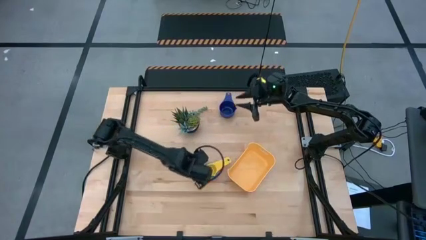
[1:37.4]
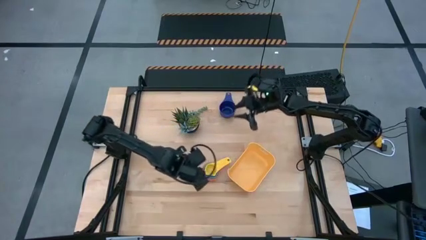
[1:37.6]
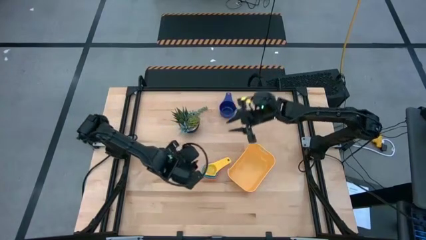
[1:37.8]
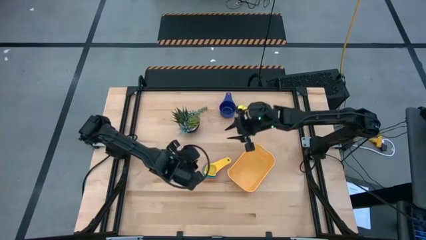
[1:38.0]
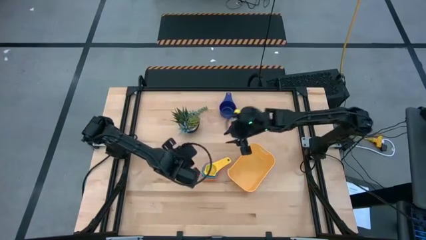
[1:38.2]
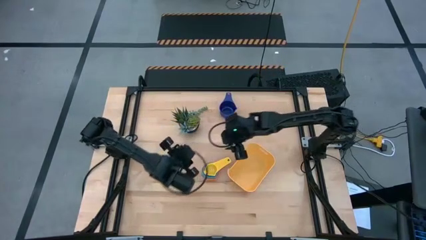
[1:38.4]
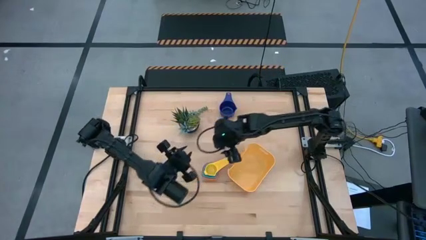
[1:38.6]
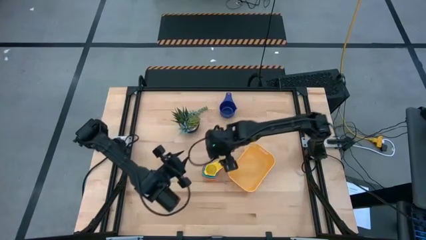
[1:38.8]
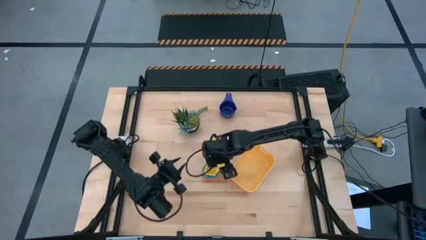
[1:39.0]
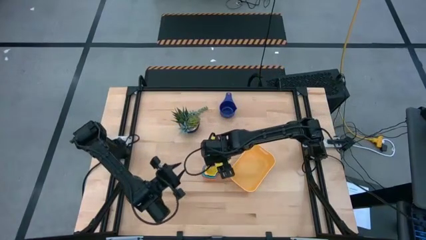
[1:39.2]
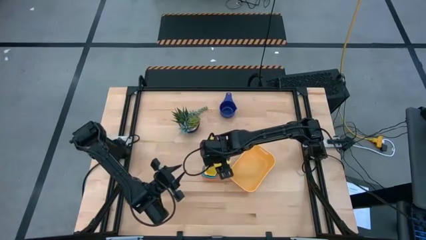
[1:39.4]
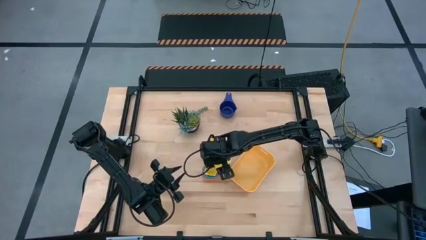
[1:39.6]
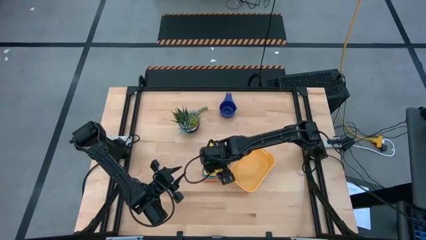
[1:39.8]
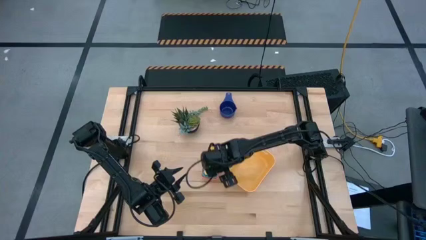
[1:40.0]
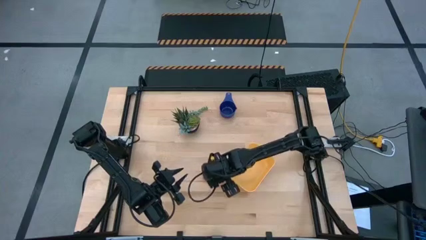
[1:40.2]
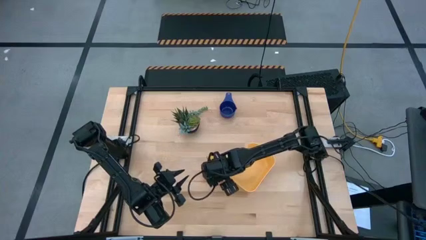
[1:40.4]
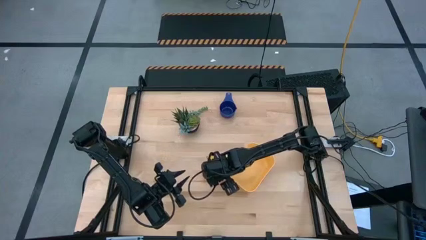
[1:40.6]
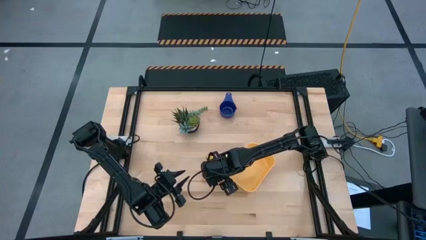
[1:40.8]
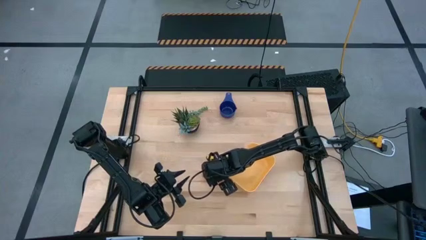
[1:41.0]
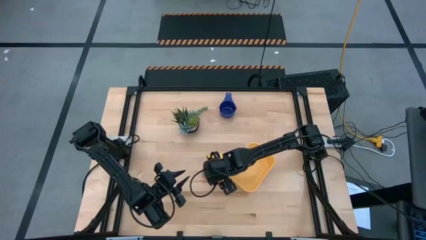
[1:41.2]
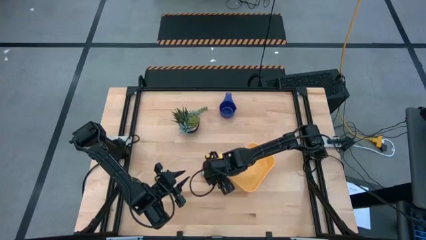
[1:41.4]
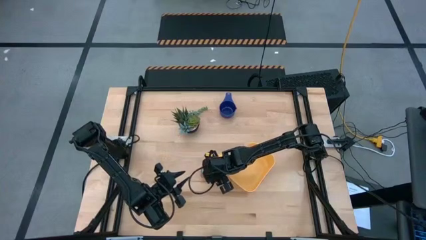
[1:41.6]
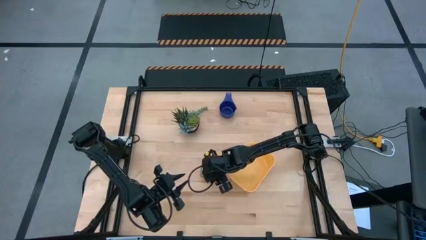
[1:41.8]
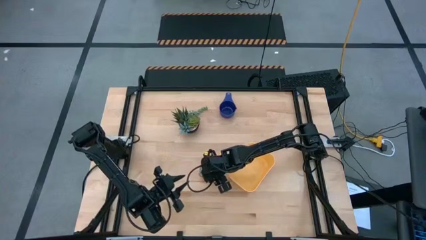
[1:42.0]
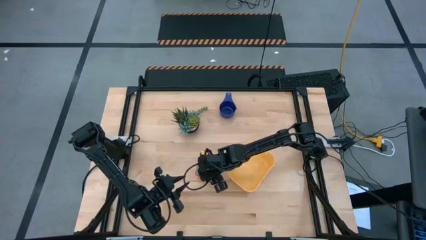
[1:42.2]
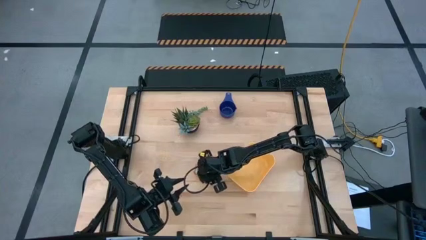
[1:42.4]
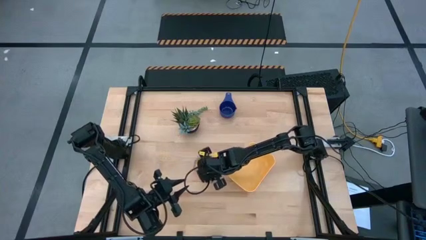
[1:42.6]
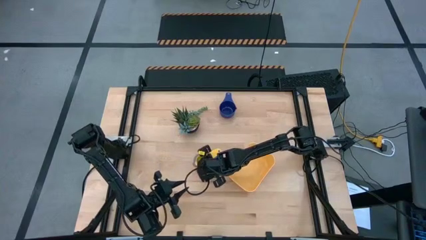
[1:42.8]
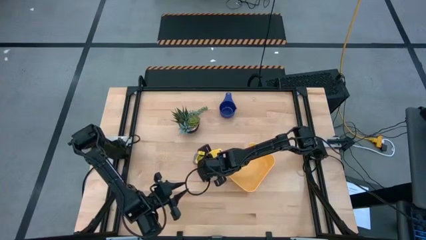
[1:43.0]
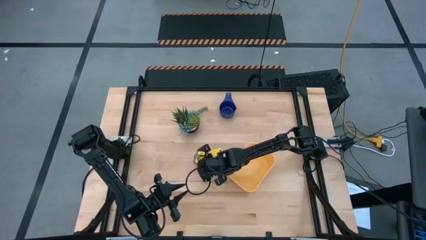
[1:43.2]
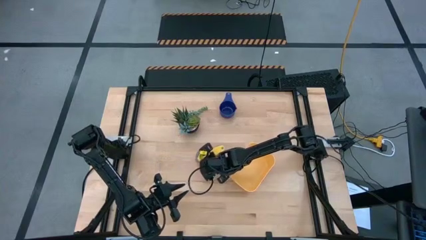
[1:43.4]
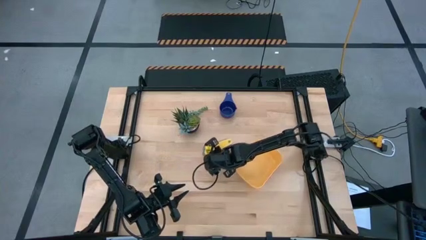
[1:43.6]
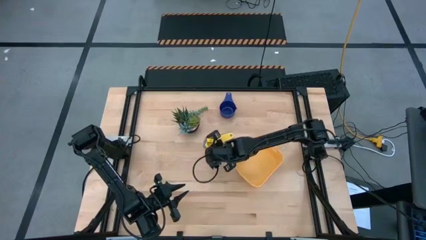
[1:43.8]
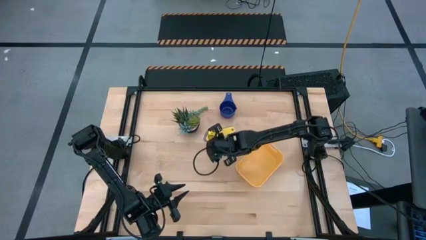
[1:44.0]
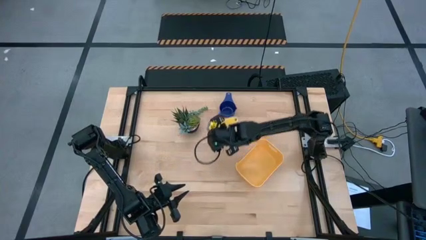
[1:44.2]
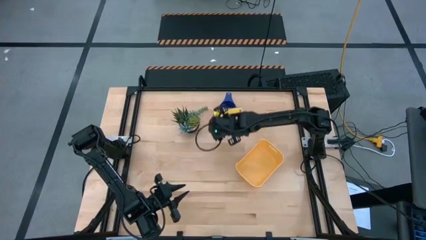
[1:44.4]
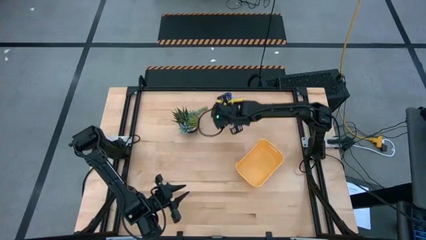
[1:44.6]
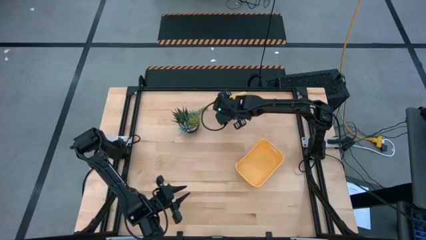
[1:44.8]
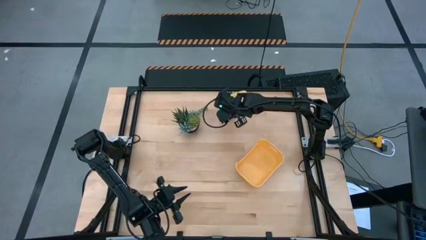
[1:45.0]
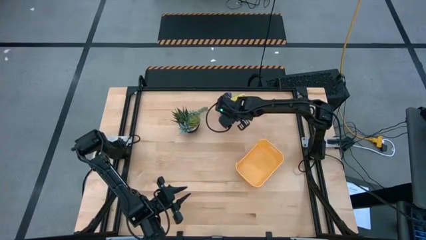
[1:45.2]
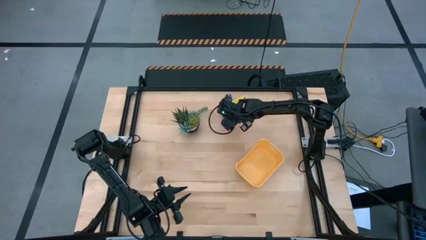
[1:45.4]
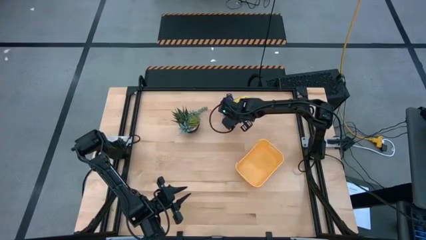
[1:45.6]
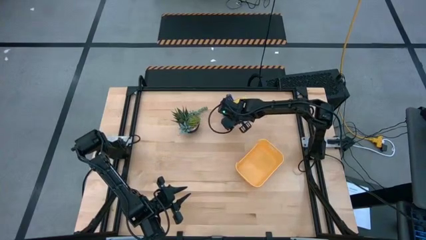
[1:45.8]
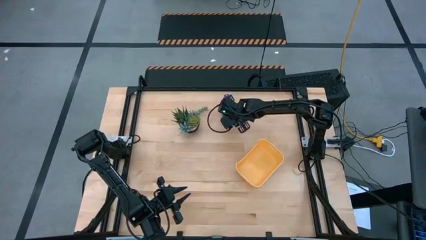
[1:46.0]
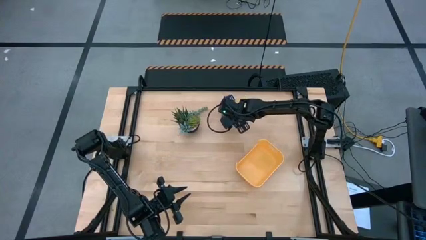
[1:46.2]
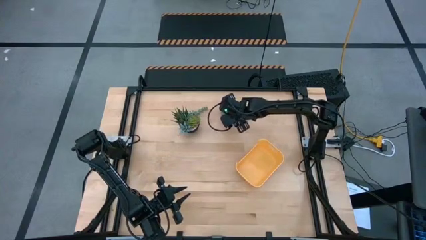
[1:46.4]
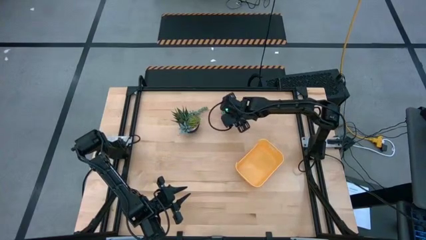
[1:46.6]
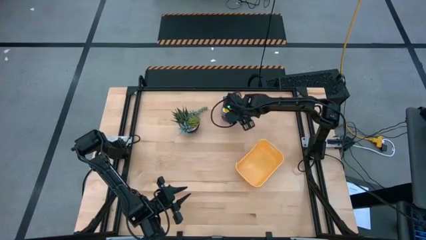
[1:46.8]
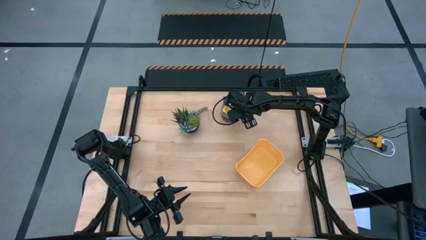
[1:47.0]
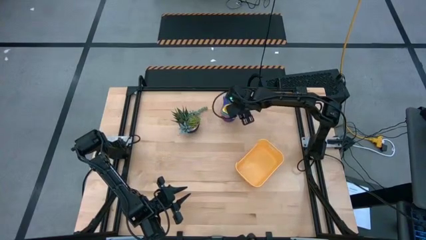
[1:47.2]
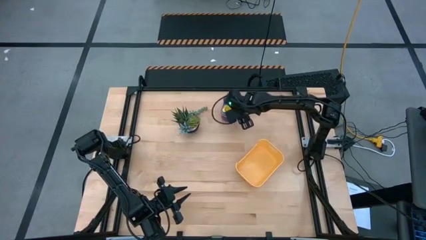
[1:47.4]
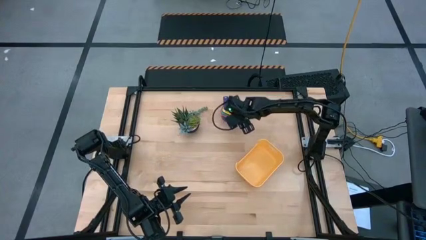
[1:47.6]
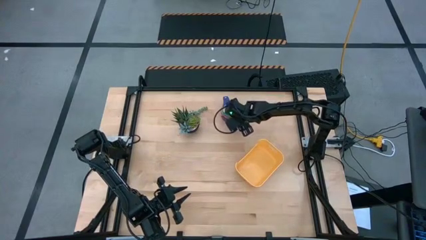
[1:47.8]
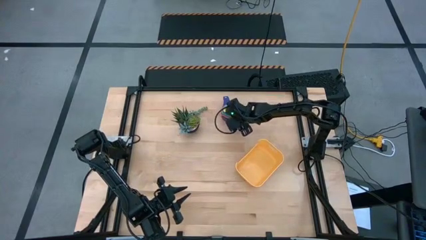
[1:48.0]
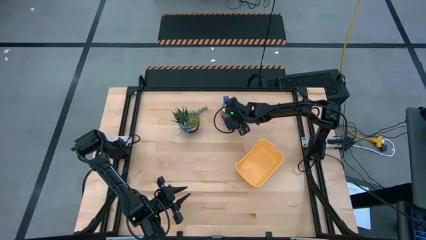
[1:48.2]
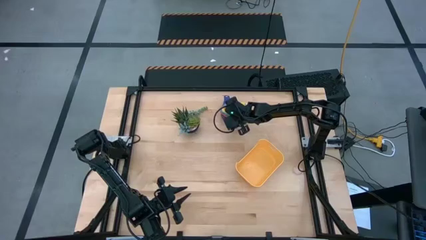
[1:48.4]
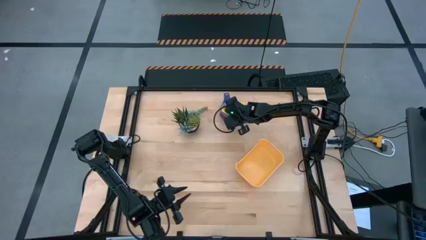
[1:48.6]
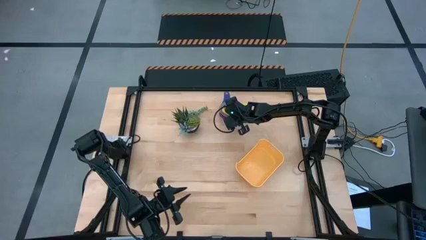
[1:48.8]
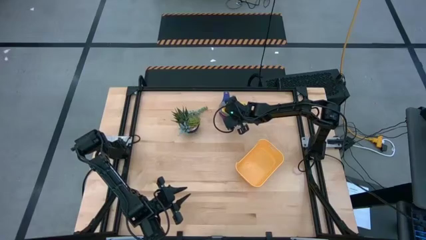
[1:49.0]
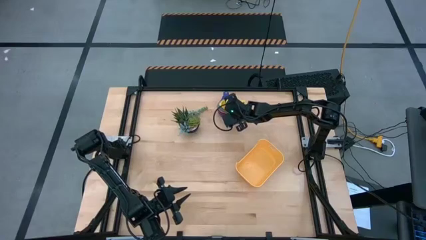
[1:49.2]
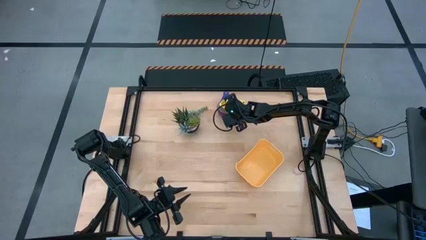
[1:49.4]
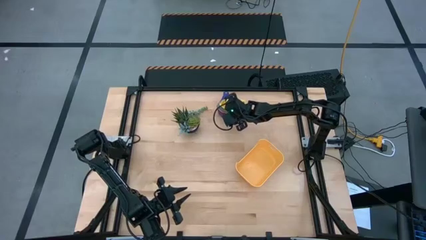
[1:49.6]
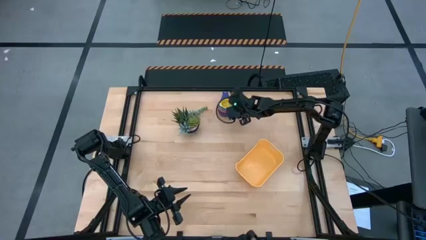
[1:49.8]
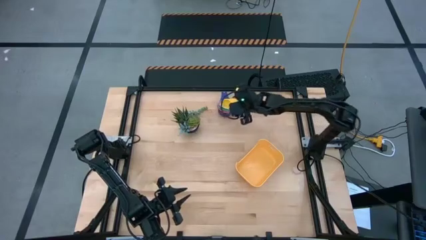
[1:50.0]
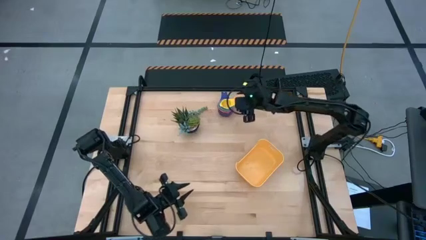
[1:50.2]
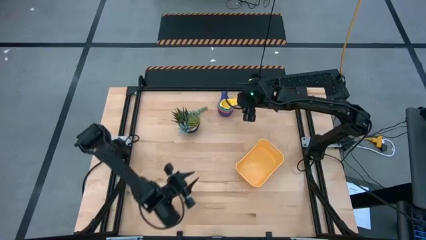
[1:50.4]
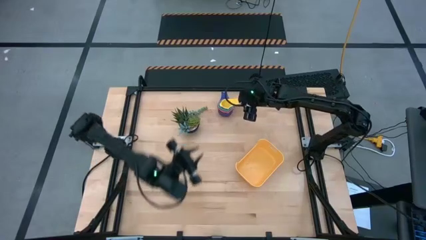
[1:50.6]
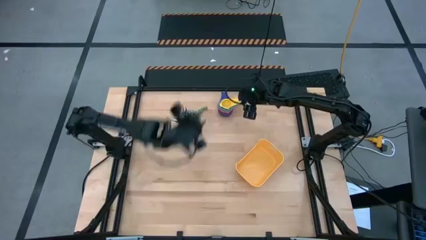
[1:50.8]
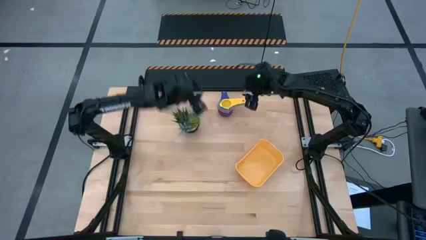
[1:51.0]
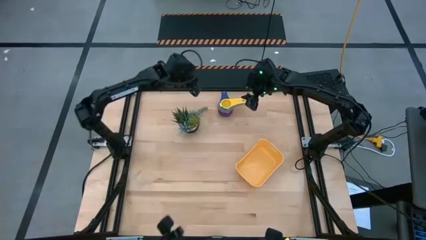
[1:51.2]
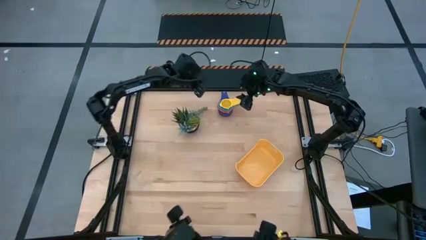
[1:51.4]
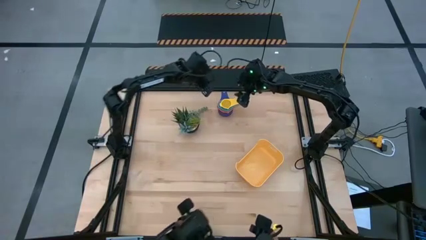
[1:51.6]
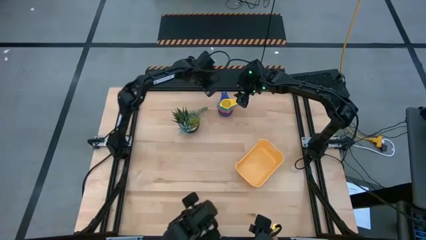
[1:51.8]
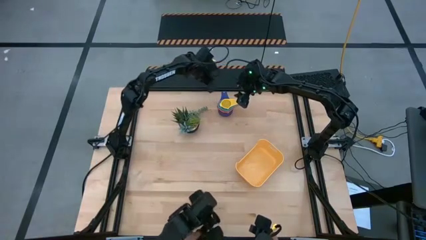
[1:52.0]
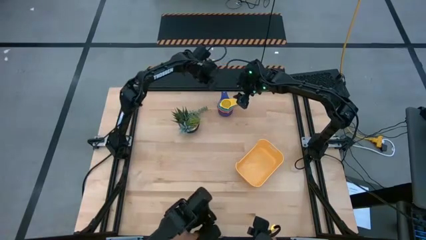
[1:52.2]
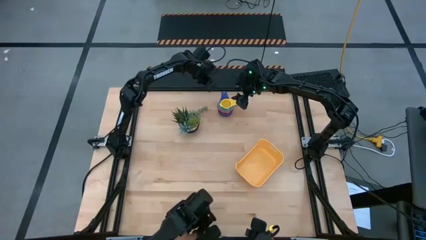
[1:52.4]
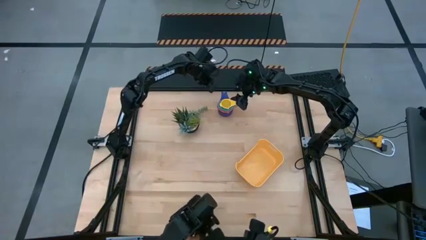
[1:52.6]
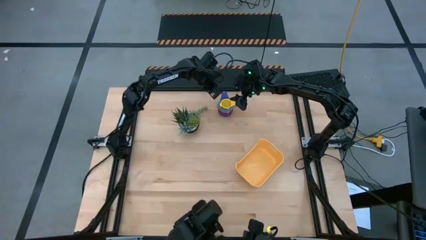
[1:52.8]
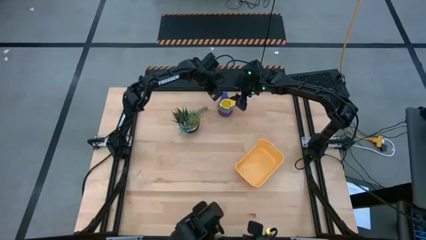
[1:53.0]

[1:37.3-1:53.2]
Task: Nest measuring cups in basket
Stack the measuring cups on the purple measuring cup

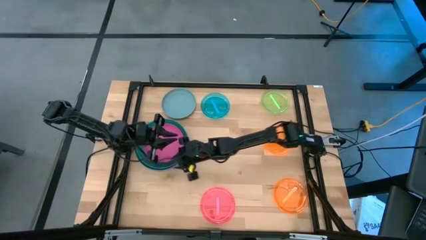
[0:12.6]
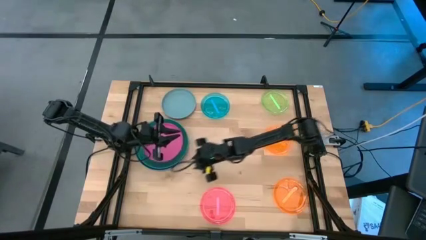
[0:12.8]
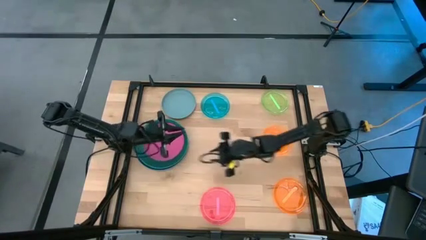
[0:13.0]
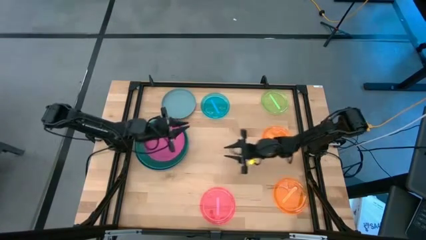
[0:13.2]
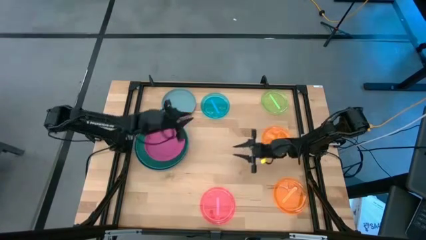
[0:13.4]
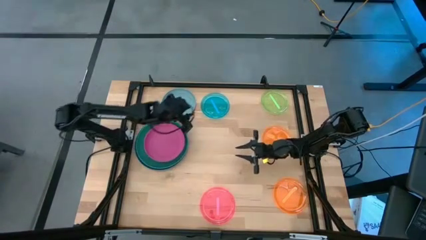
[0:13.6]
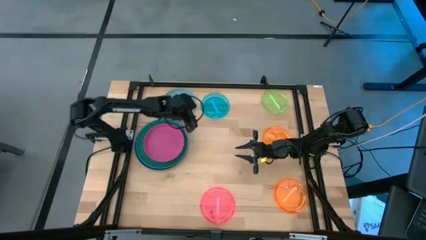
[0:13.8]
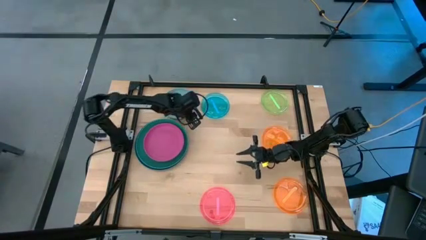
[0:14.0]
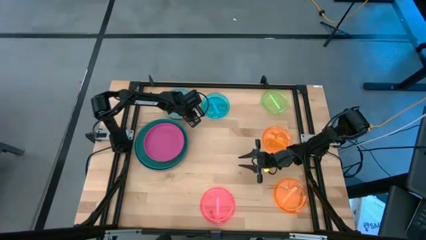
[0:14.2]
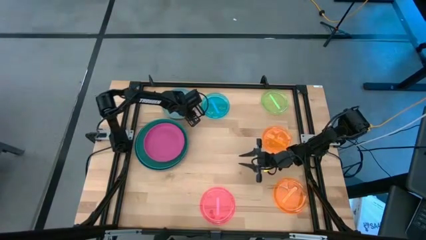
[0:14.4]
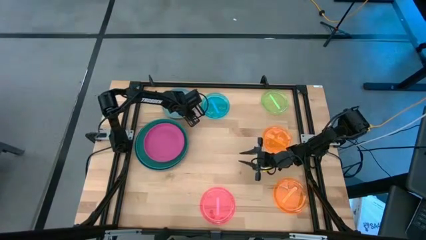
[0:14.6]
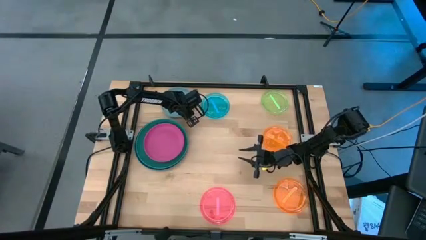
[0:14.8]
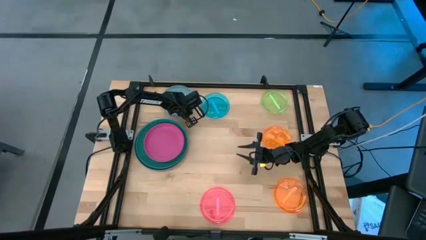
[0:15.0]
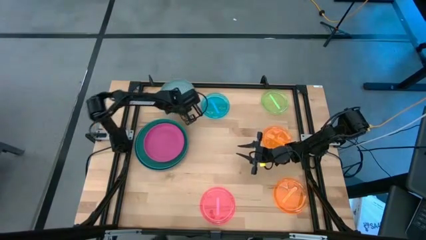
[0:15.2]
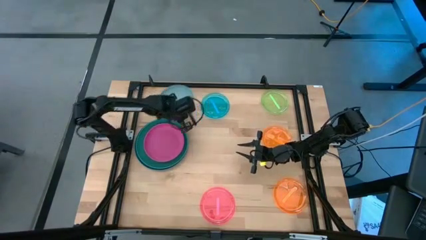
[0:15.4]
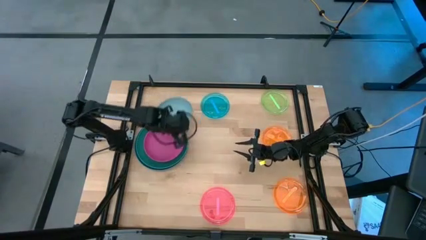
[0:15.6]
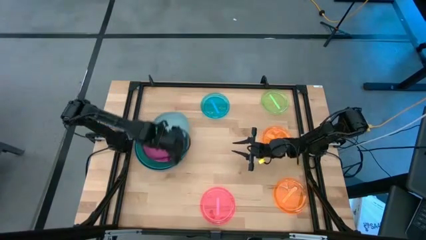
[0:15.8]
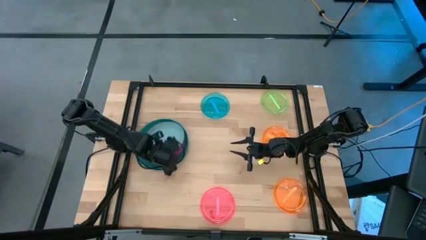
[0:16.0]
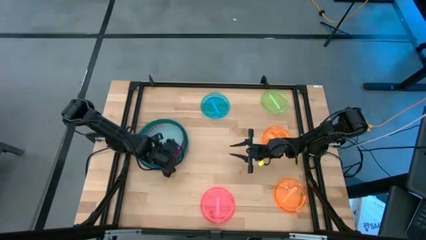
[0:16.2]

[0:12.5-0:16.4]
Task: Stack plastic plates
Stack the gray plate on top of the dark pink plate
